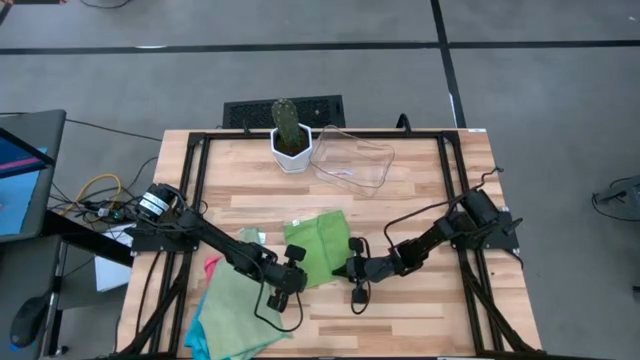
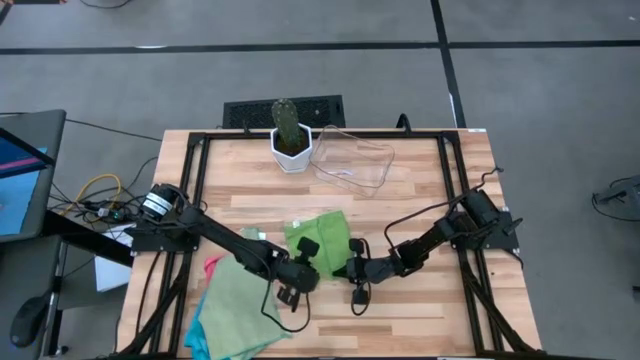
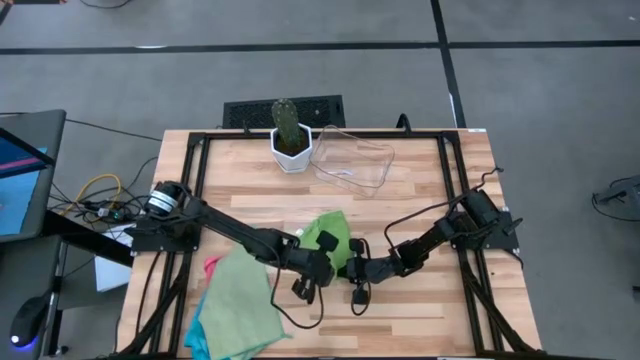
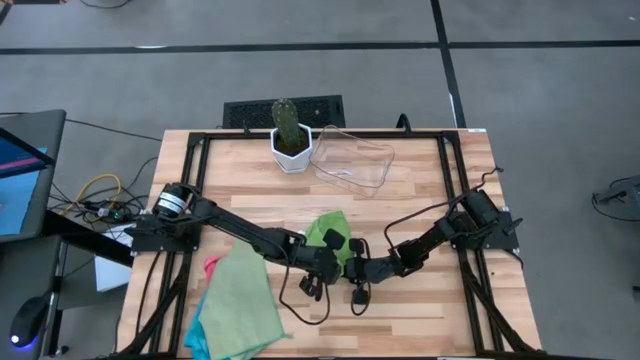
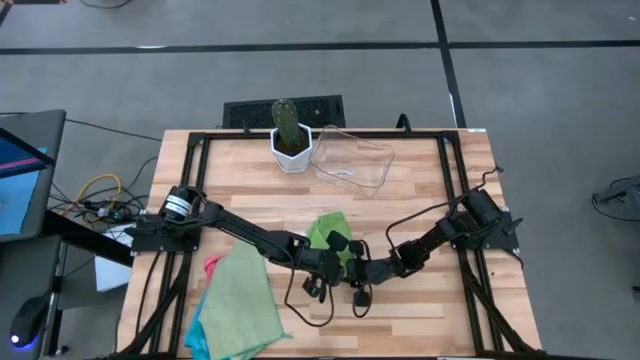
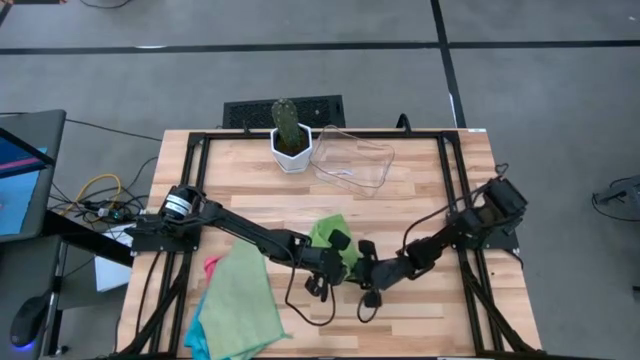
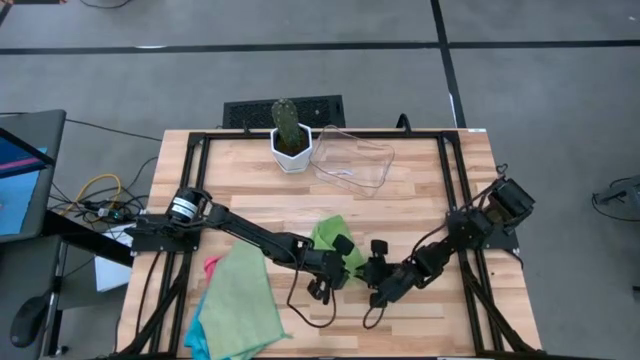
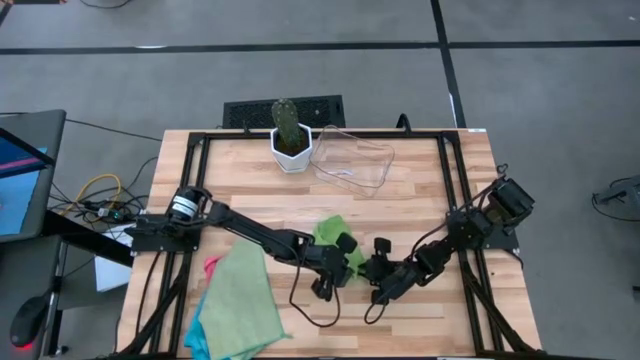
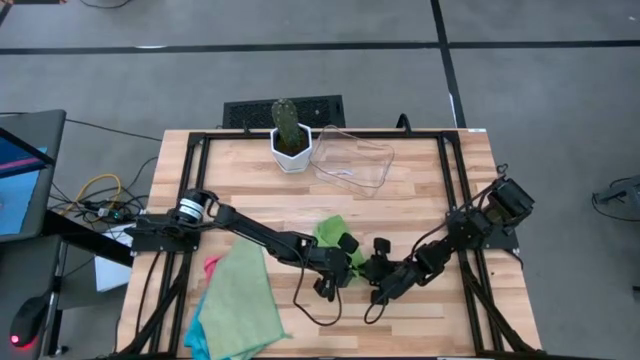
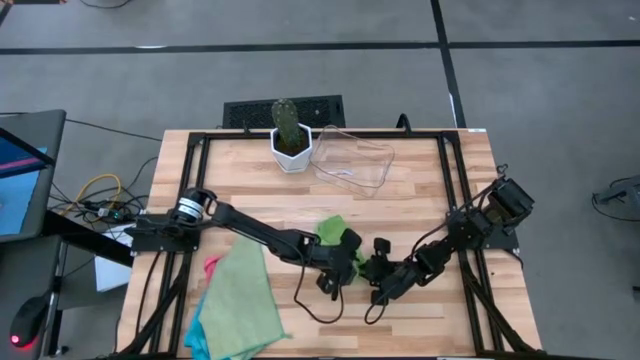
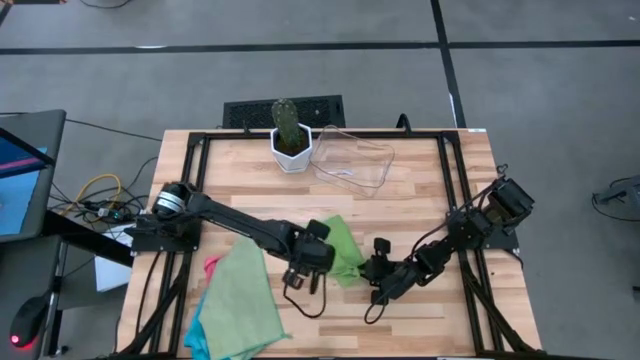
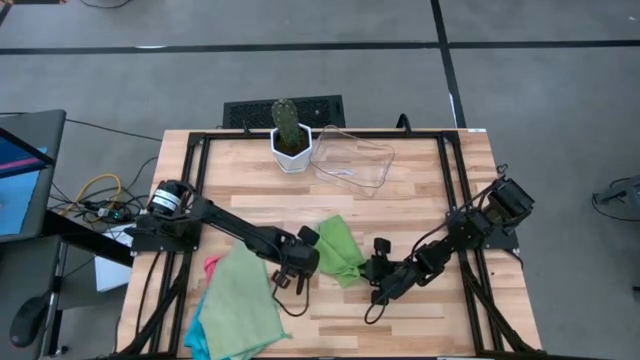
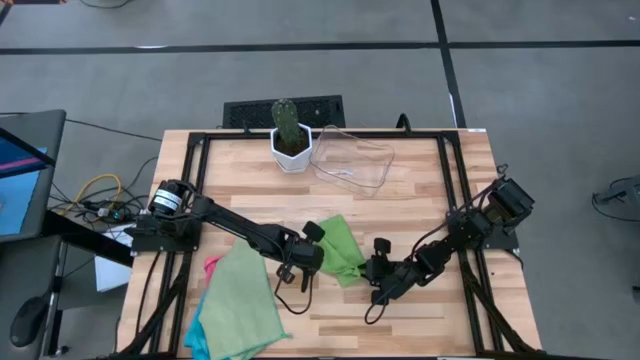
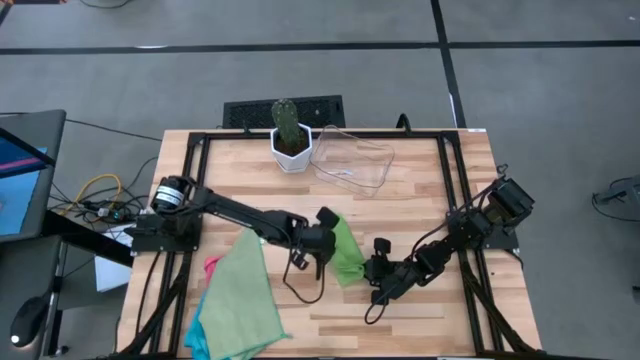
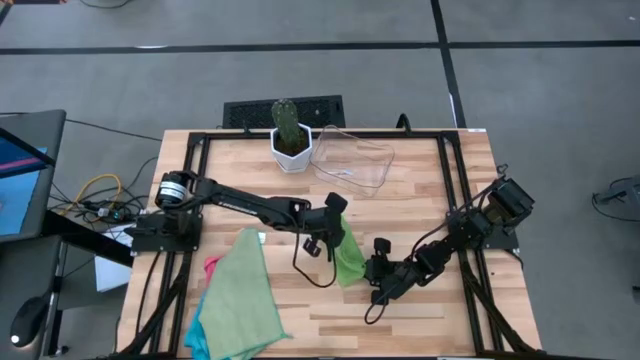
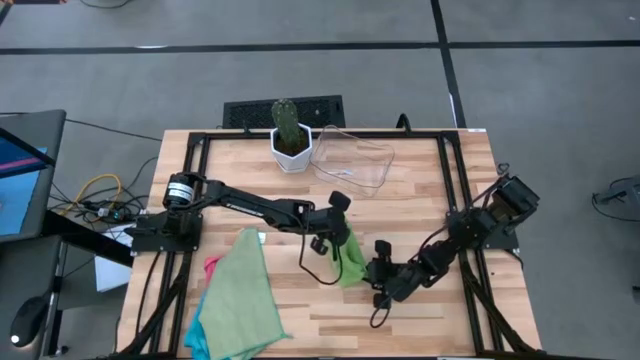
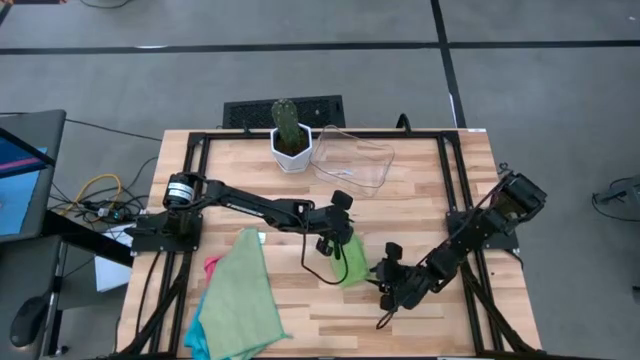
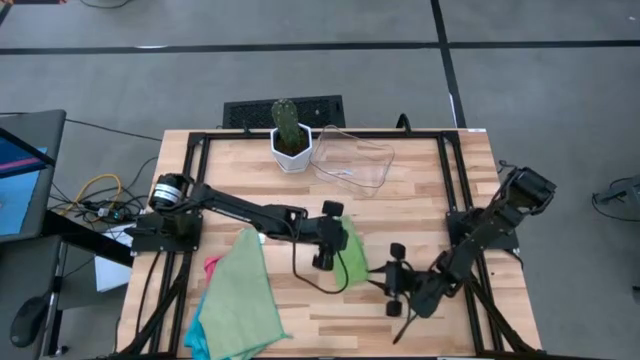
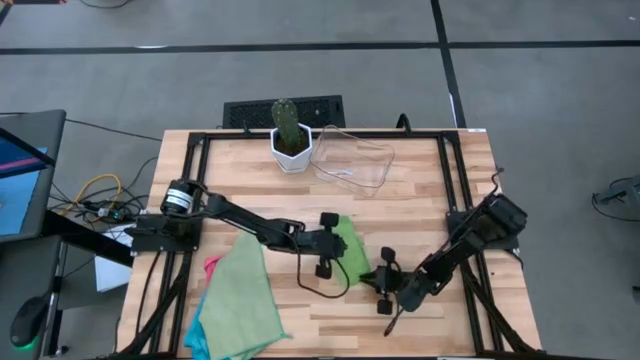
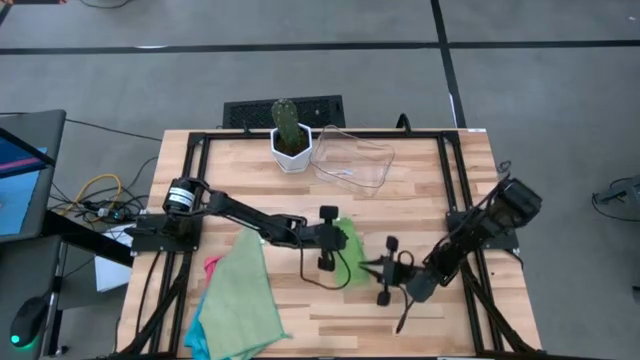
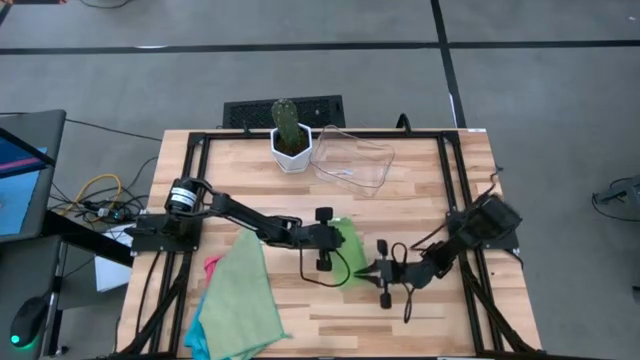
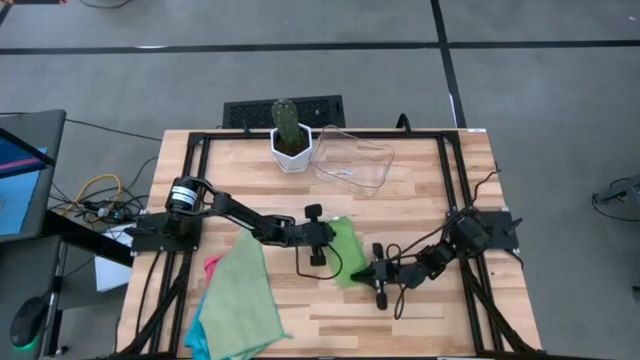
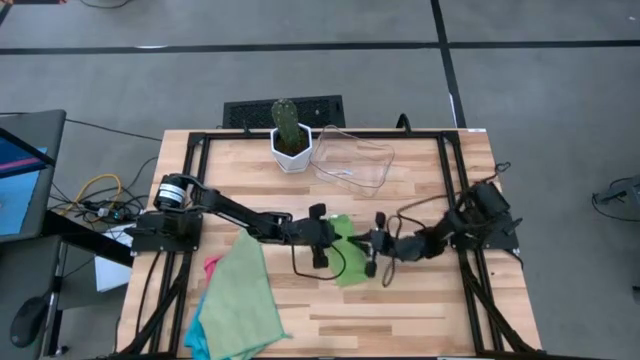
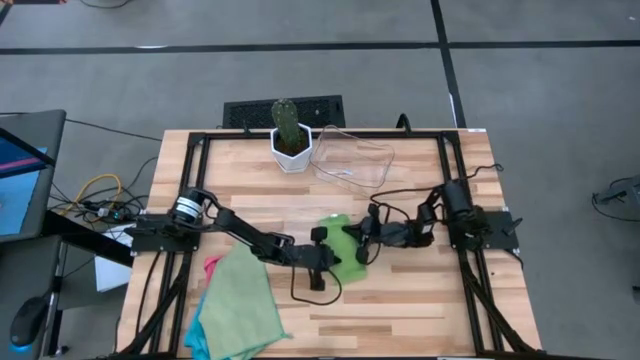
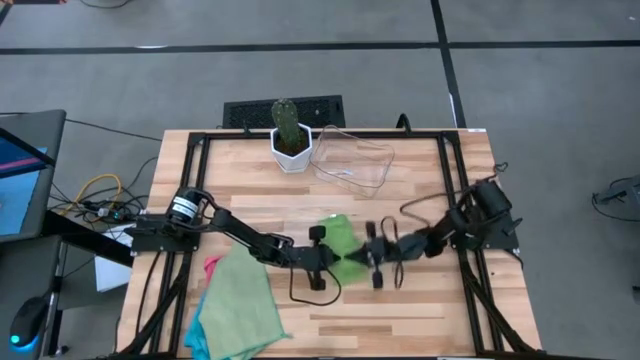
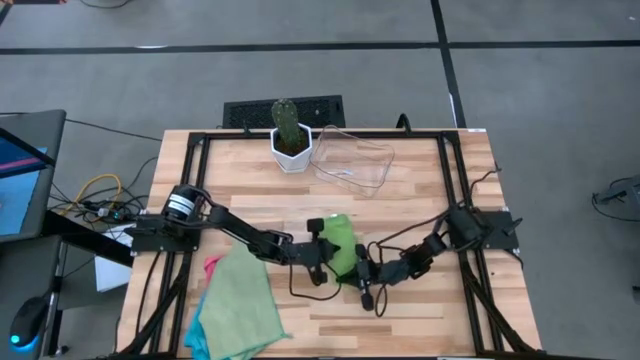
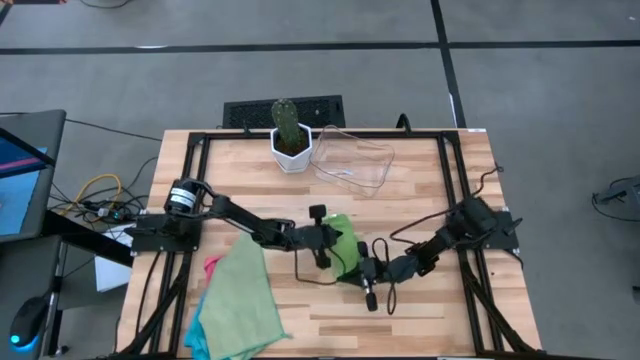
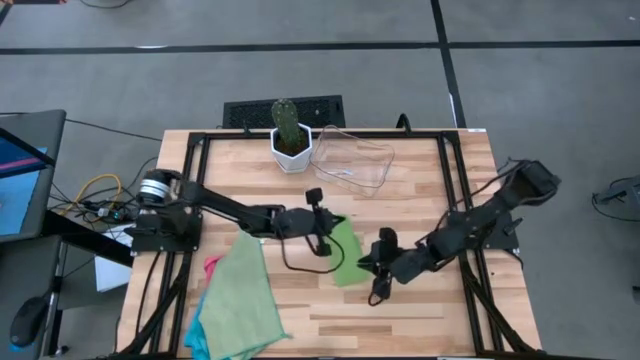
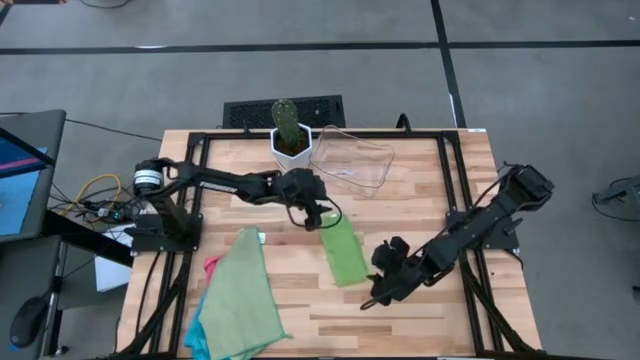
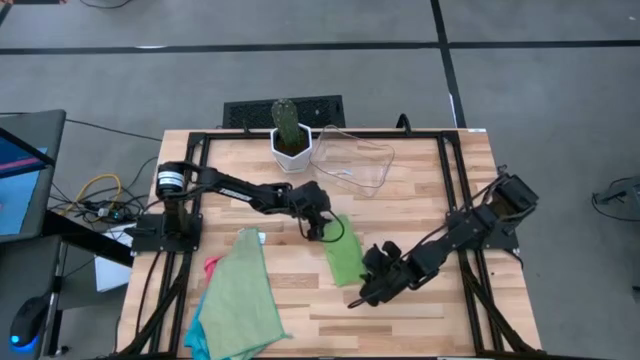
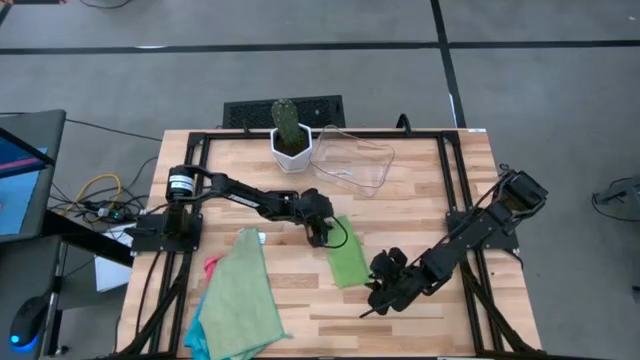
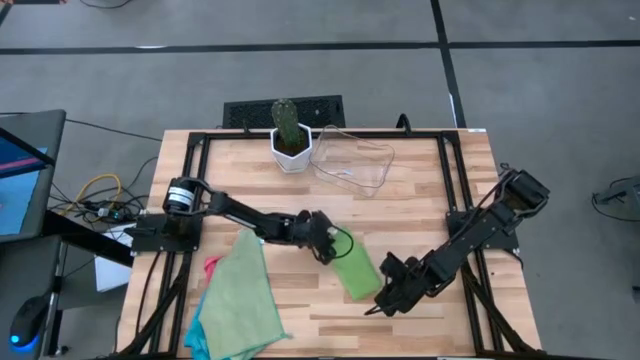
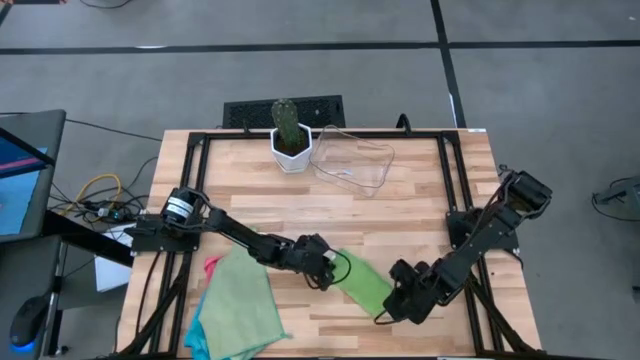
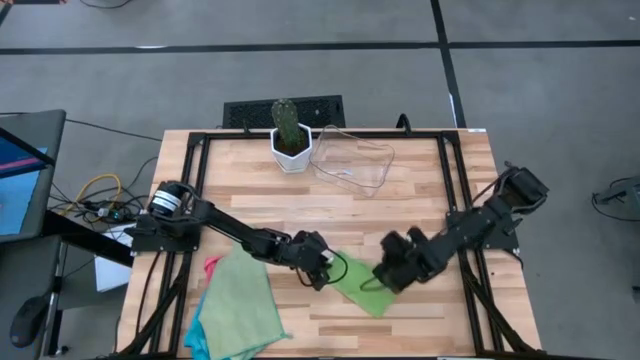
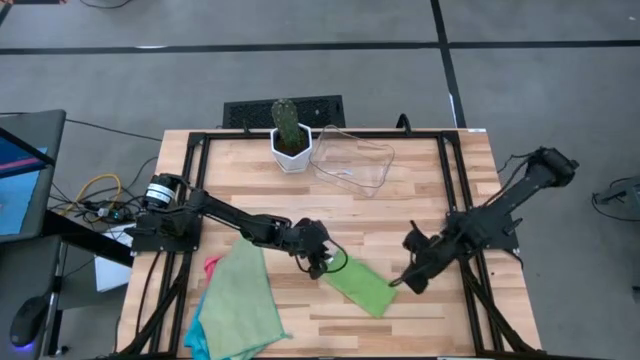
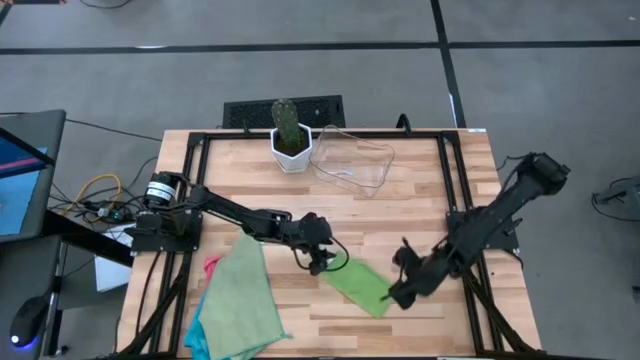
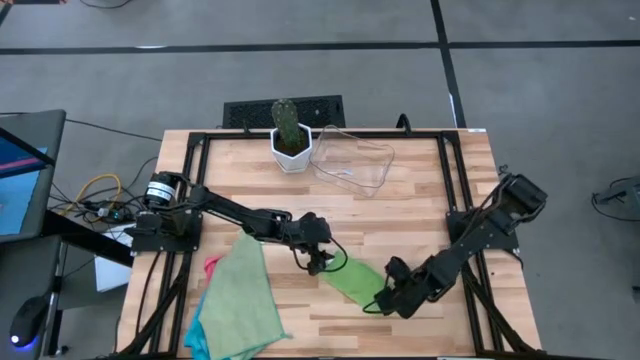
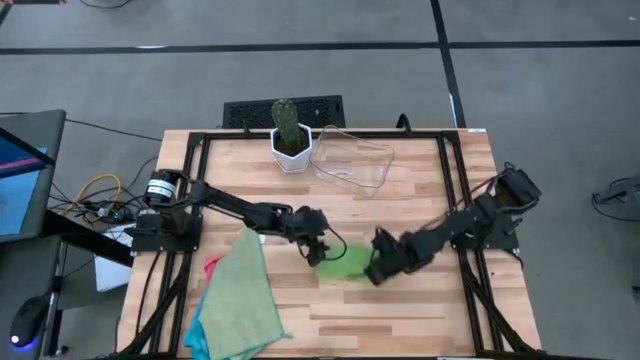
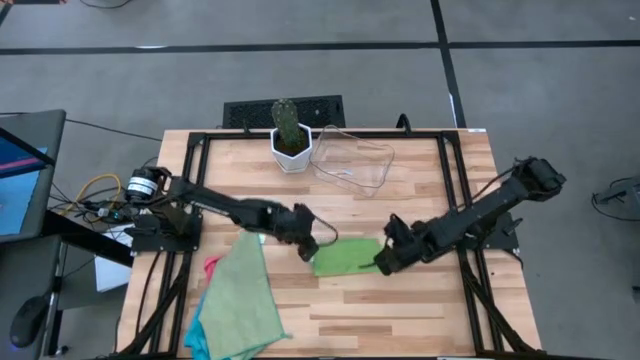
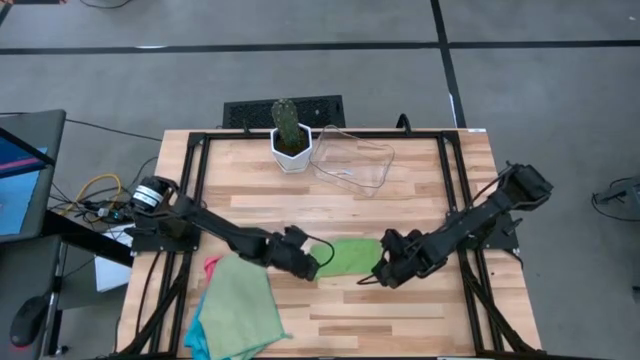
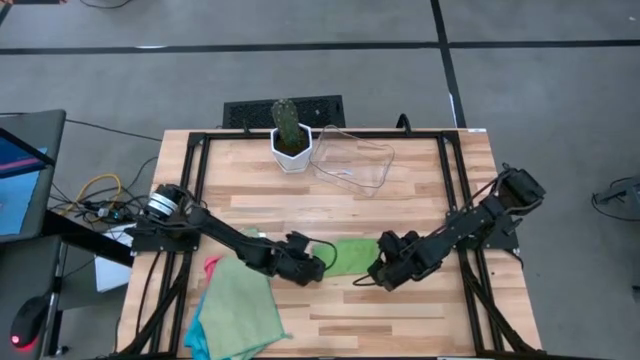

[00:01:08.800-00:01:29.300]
Task: Fold microfiber towels
Fold the green towel
